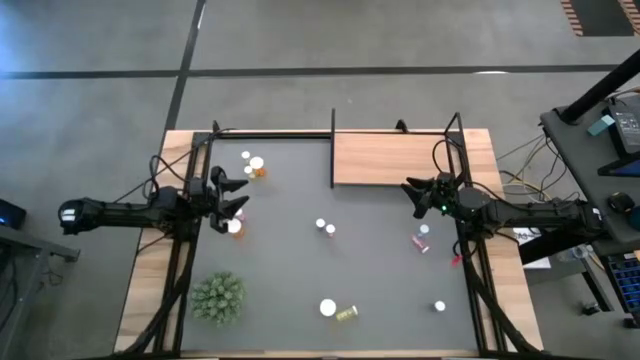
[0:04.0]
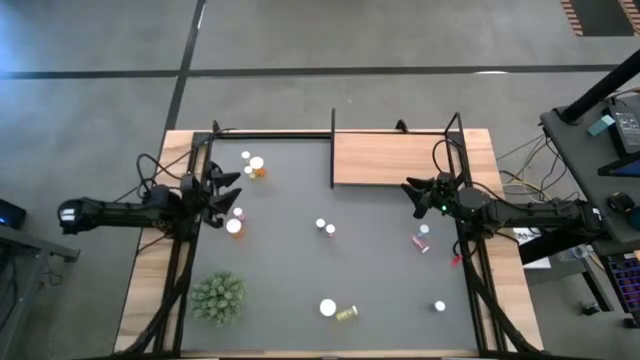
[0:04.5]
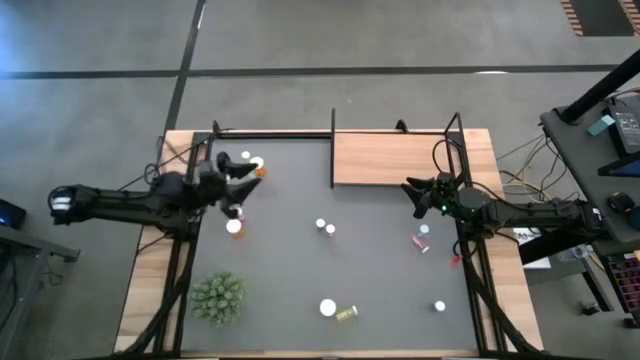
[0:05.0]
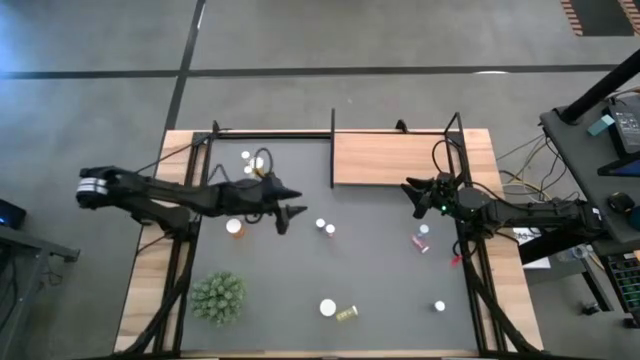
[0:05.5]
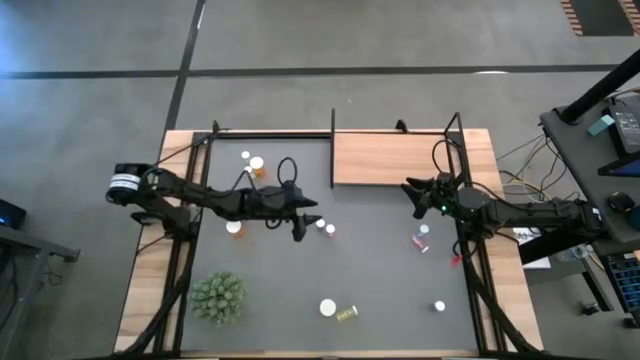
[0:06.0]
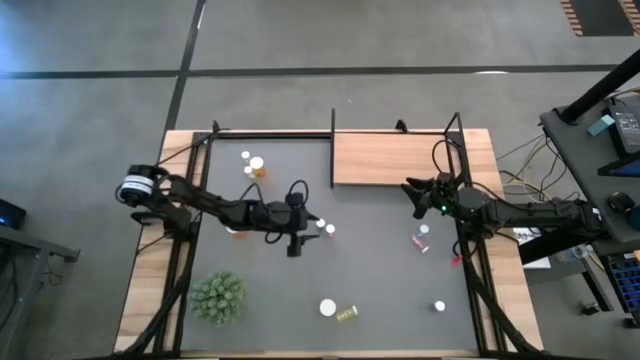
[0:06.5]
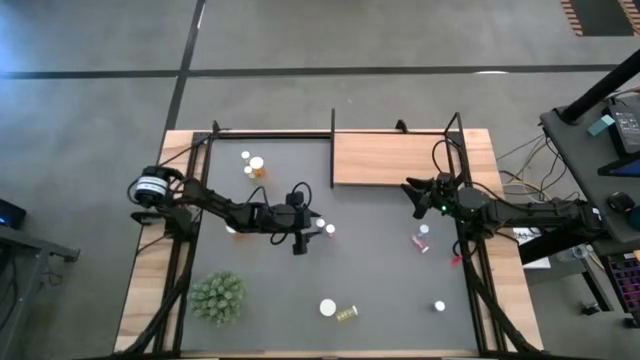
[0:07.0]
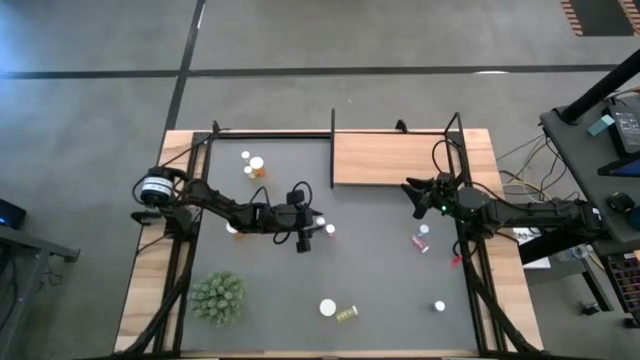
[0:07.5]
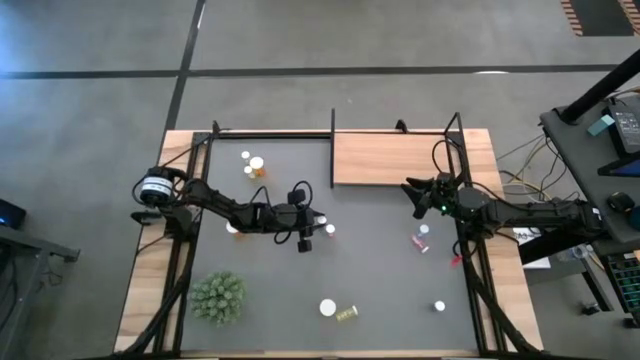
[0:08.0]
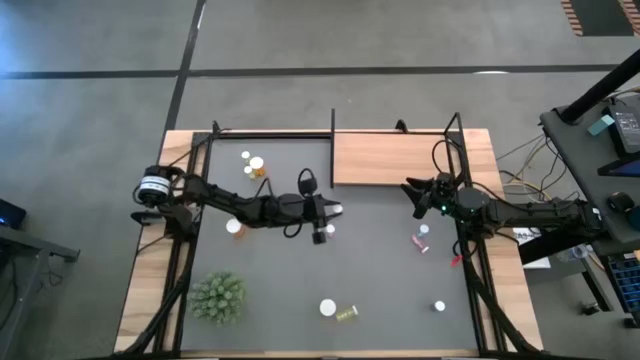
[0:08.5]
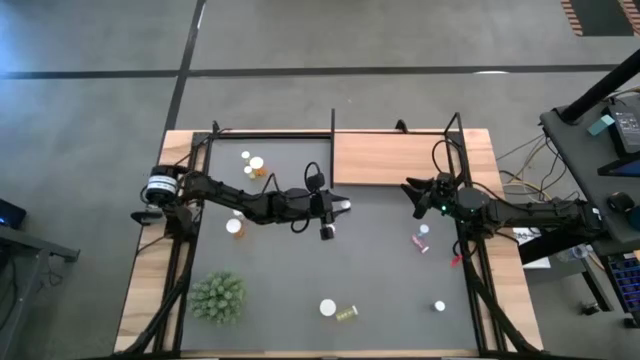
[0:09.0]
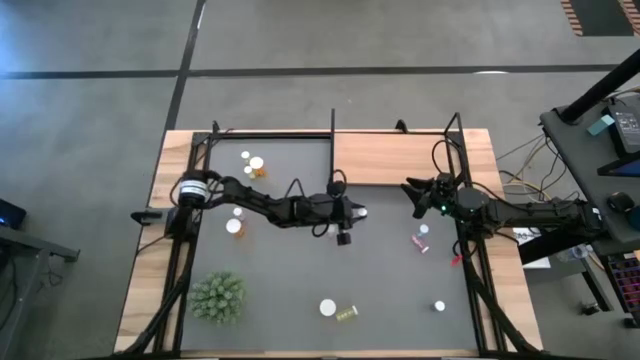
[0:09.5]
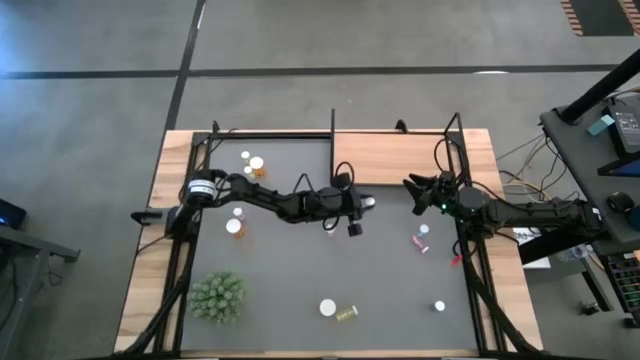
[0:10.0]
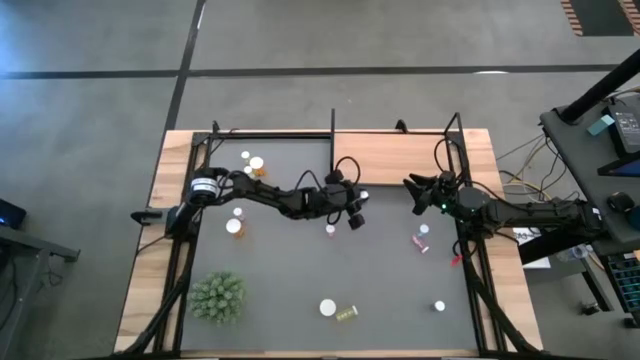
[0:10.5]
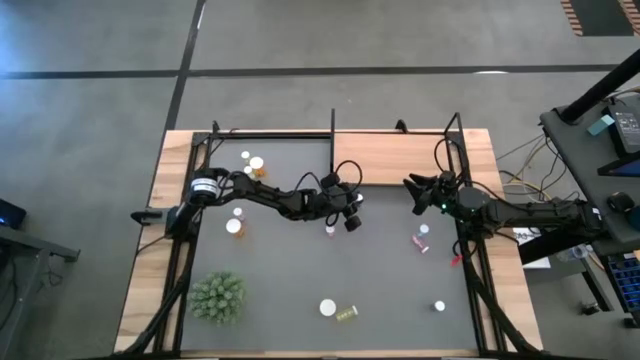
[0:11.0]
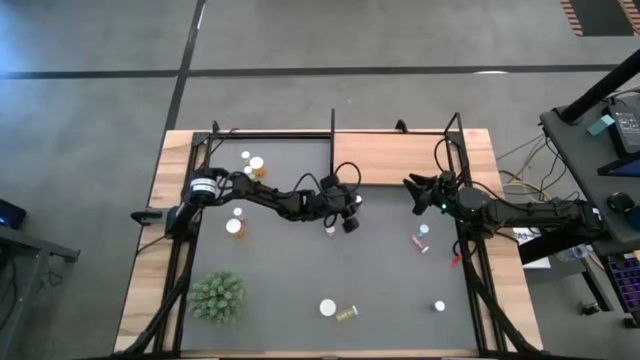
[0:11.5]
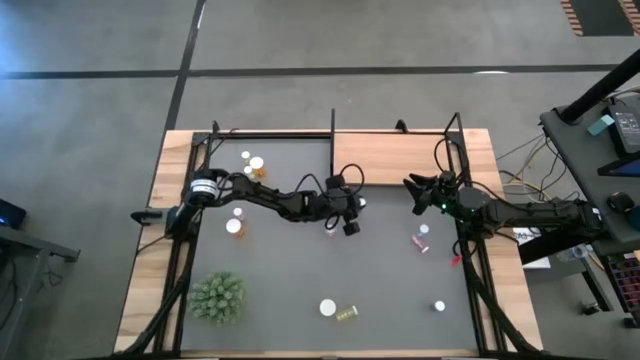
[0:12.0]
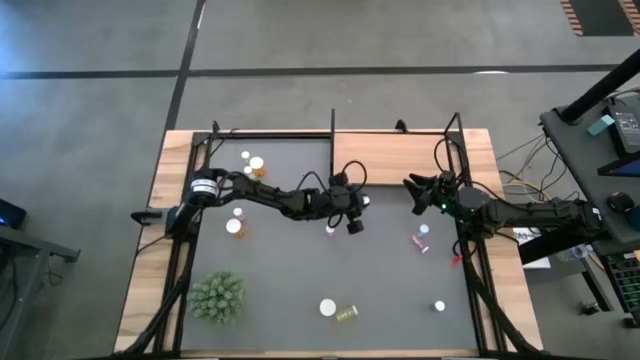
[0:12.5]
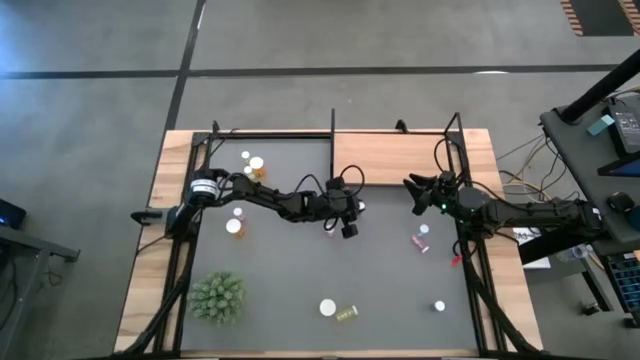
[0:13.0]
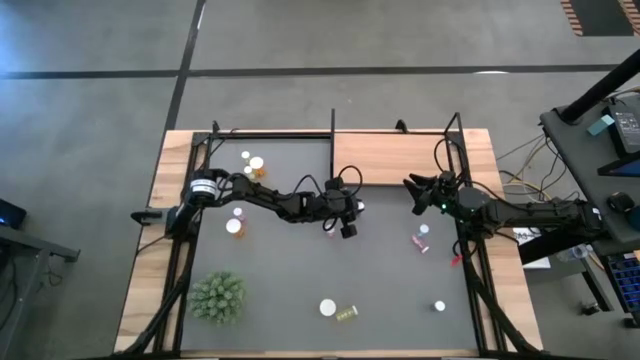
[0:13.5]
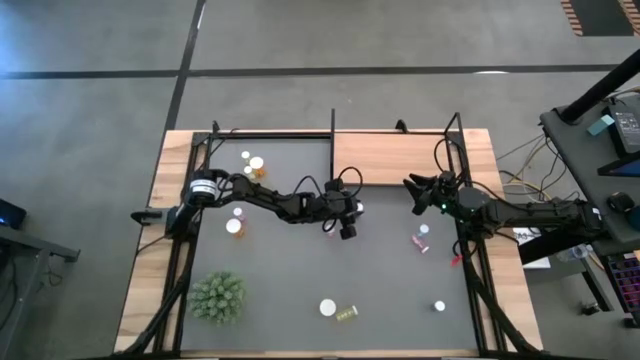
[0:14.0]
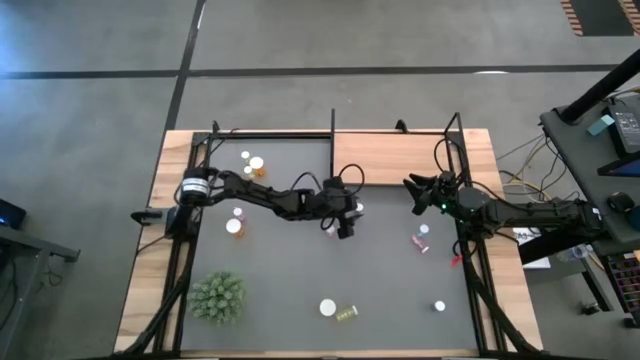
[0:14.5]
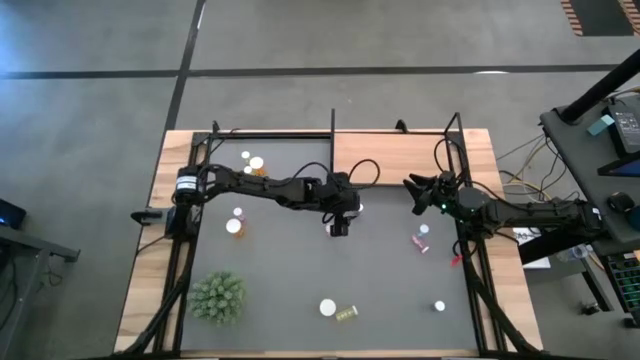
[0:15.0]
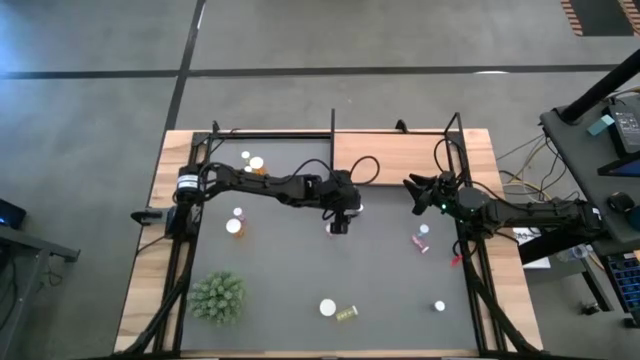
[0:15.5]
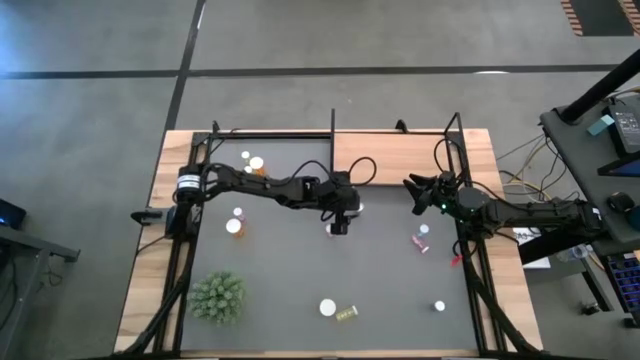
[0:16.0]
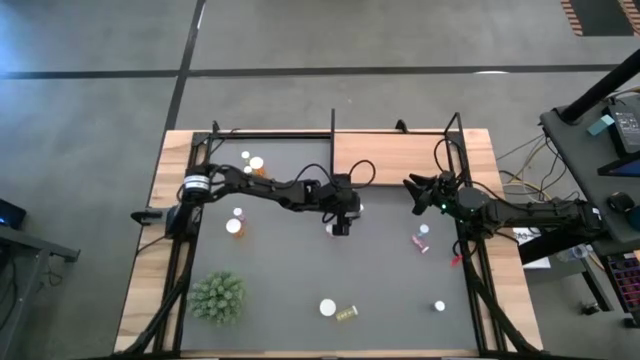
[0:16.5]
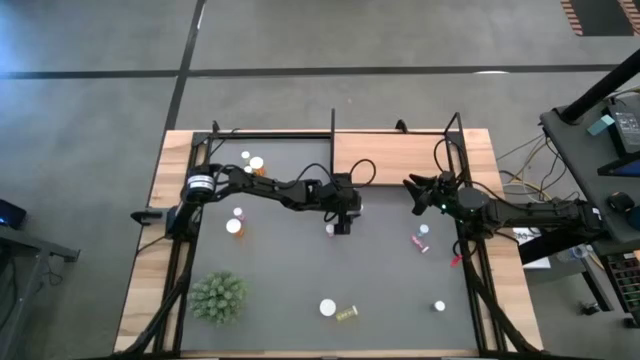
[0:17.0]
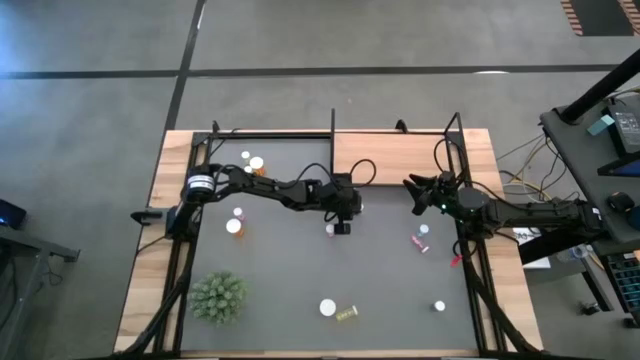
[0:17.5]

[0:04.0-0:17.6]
Task: Pick and place medicine bottles onto shelf by color
Put the top left blue pill bottle on the shelf

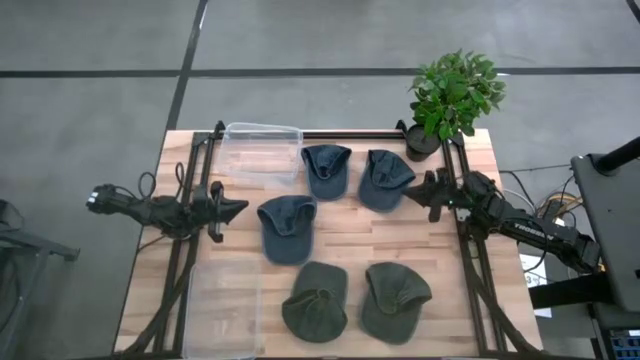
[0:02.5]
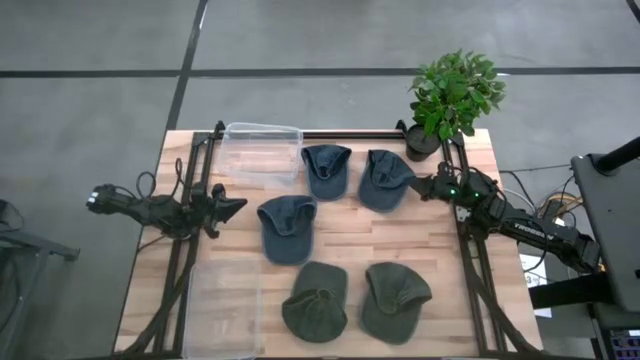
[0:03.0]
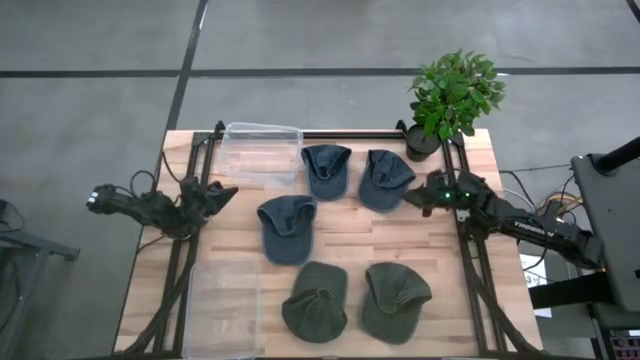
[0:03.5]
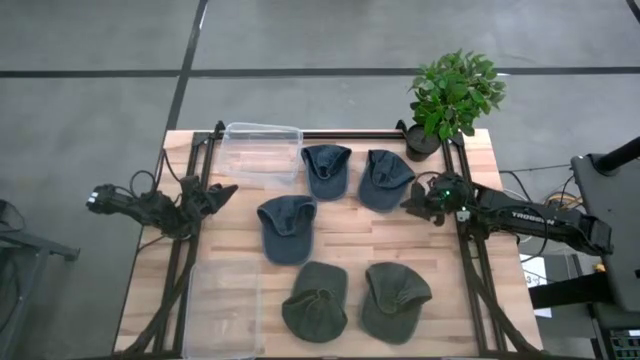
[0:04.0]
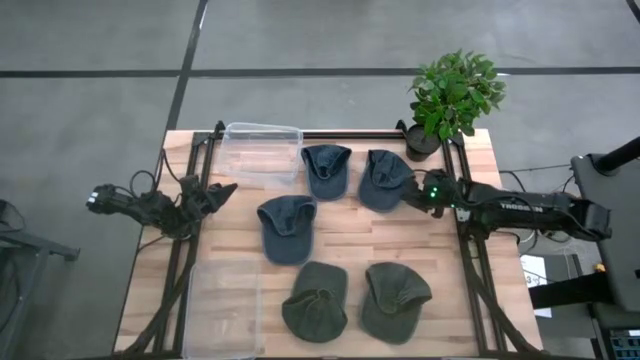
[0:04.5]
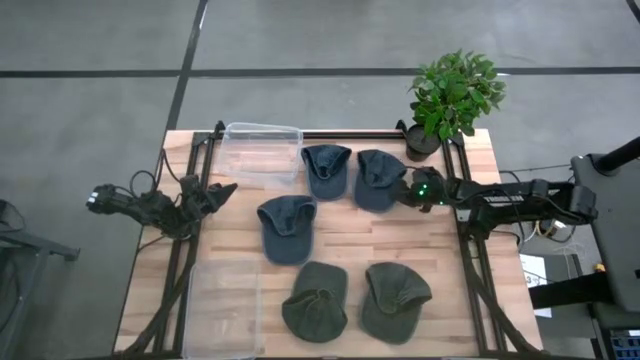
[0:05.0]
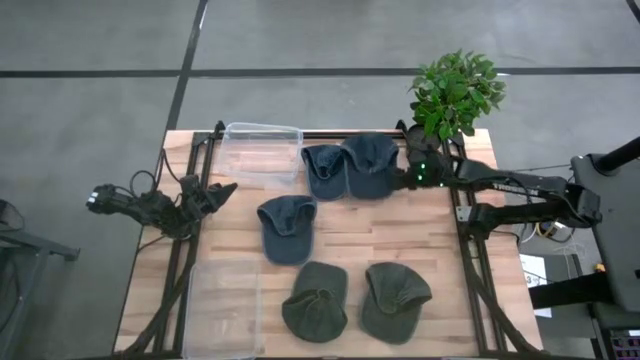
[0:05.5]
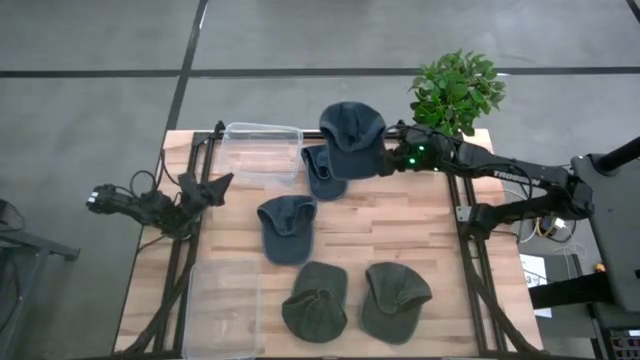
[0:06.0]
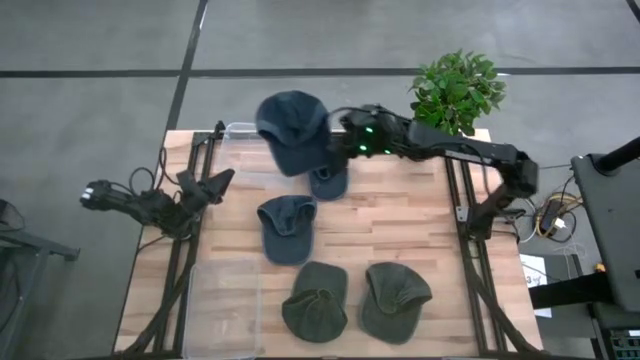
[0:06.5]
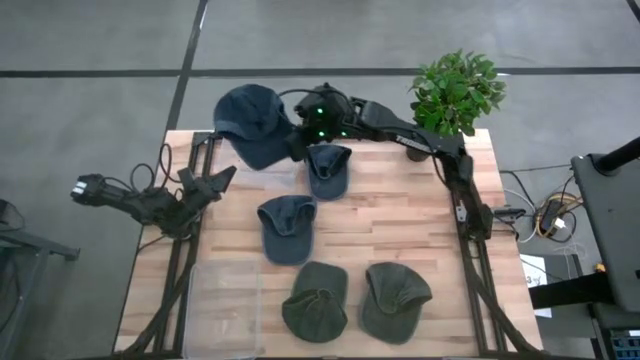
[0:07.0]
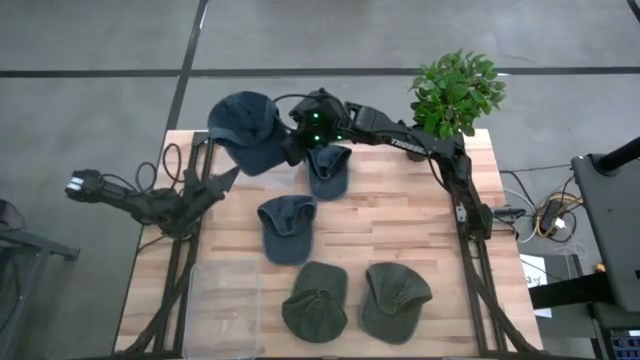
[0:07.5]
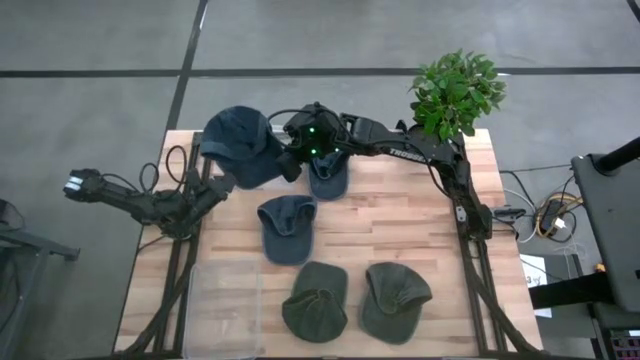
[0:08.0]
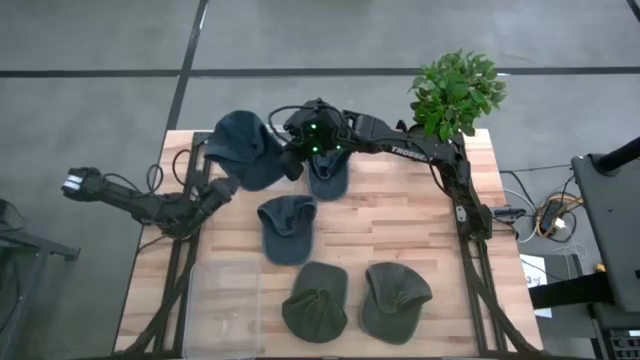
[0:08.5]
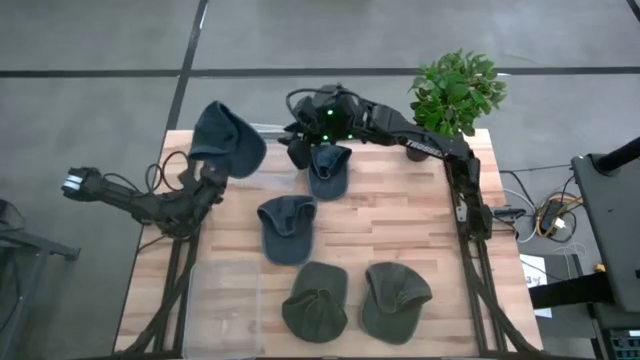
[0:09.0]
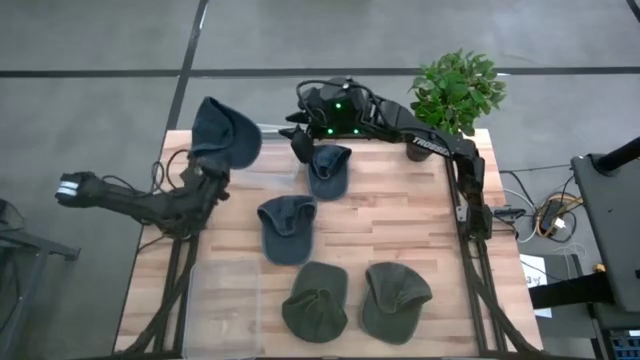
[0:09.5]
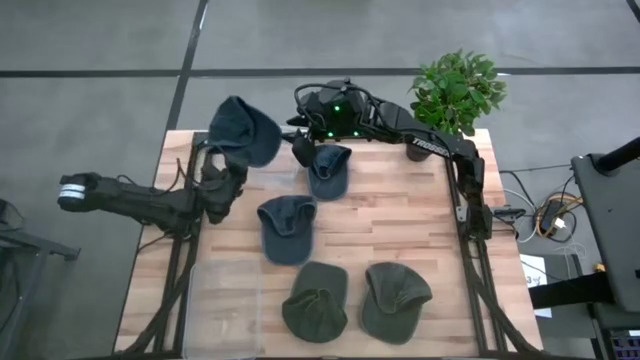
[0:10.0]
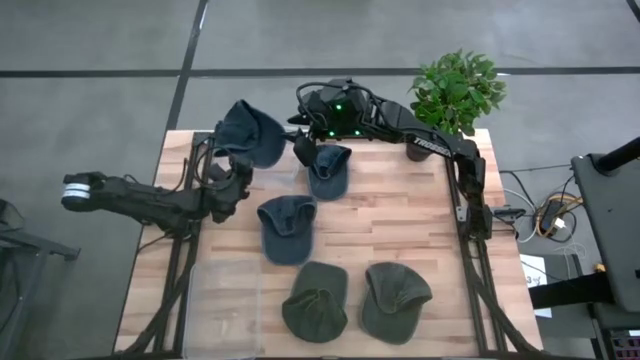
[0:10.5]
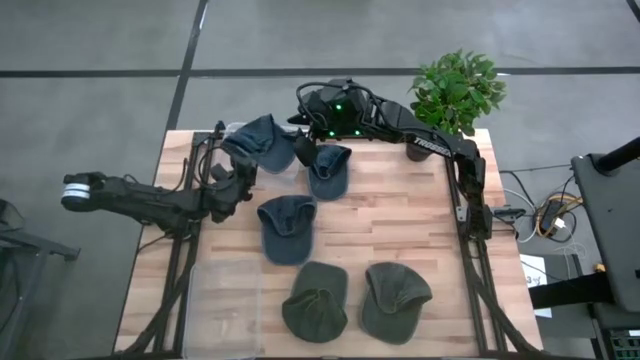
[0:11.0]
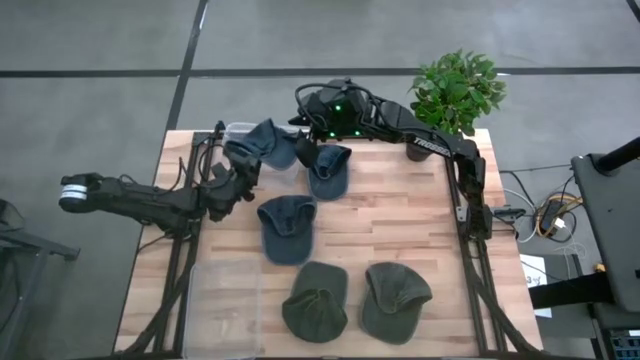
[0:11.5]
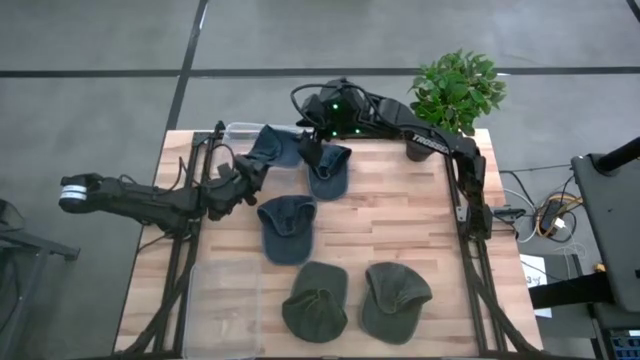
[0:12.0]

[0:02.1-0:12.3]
Task: Pick & Place hat
Put the top right blue cap into the top transparent bin
